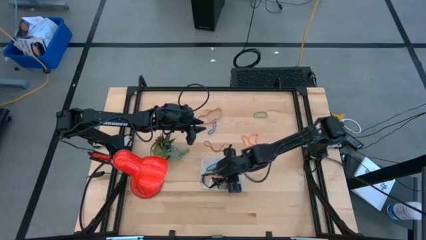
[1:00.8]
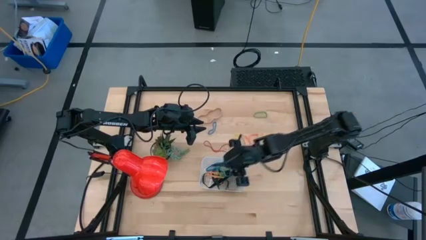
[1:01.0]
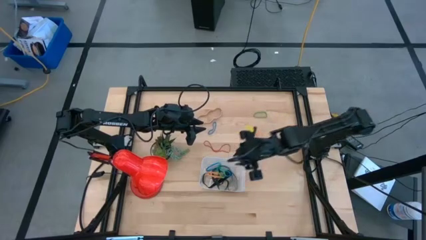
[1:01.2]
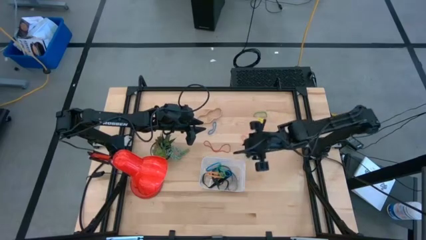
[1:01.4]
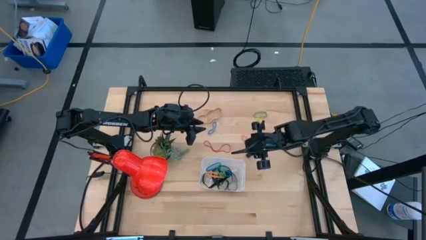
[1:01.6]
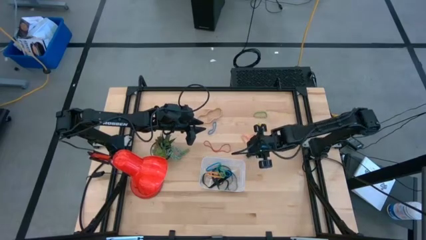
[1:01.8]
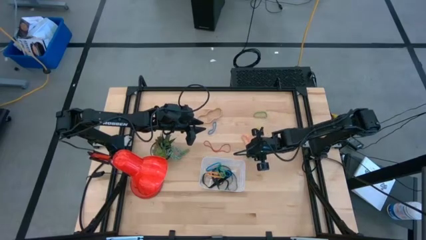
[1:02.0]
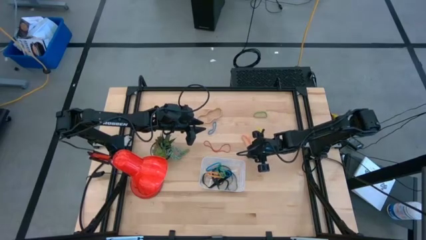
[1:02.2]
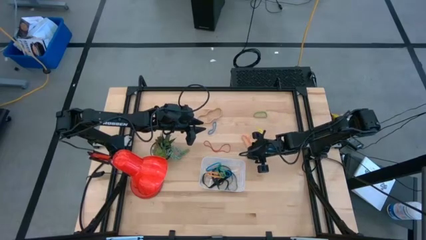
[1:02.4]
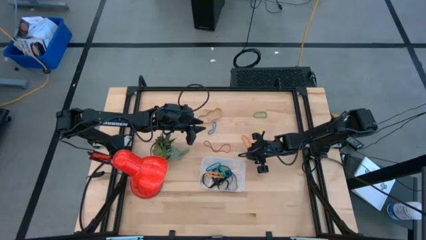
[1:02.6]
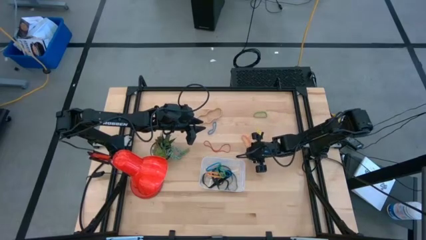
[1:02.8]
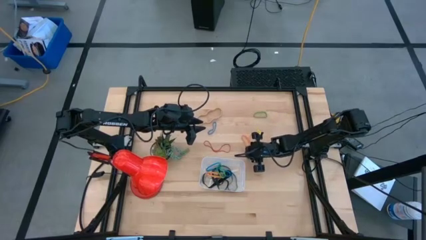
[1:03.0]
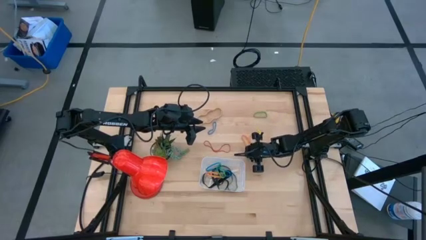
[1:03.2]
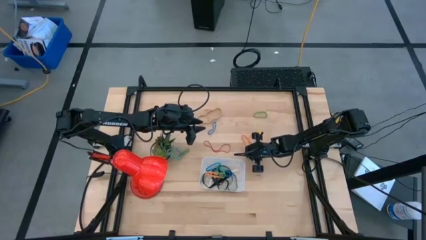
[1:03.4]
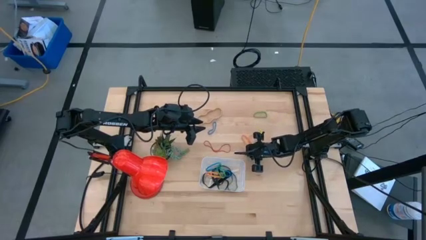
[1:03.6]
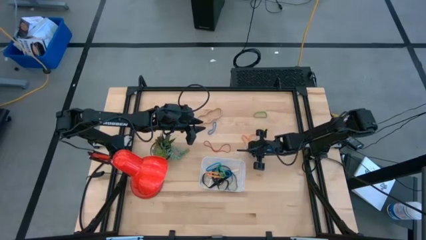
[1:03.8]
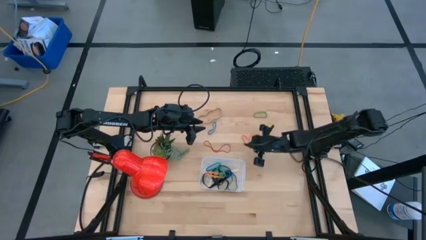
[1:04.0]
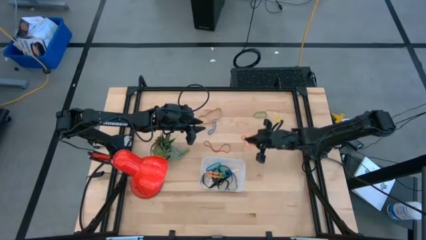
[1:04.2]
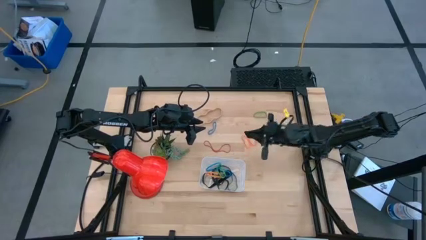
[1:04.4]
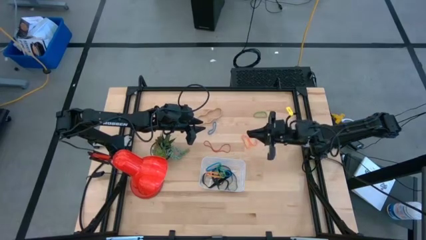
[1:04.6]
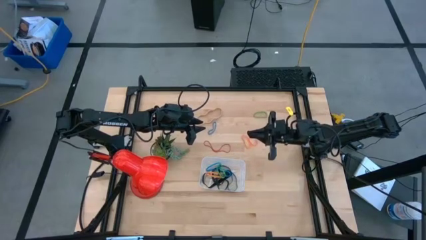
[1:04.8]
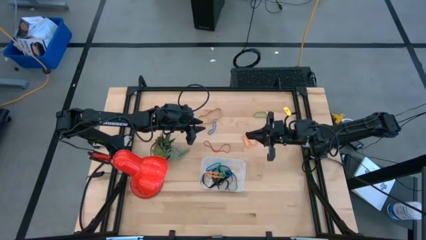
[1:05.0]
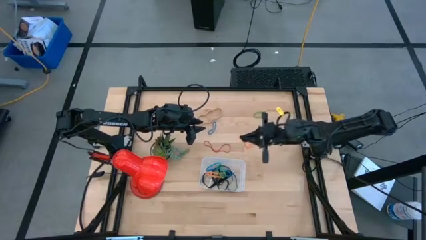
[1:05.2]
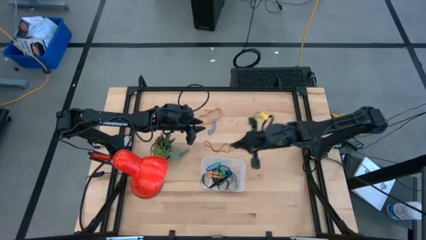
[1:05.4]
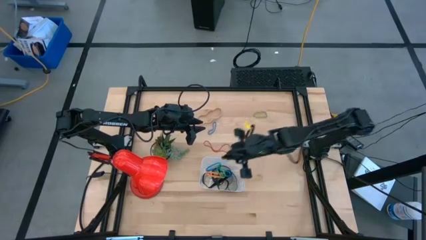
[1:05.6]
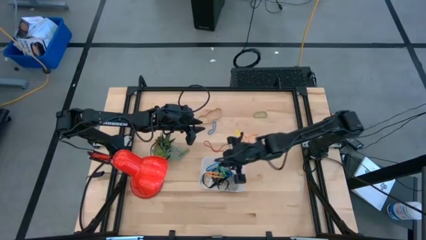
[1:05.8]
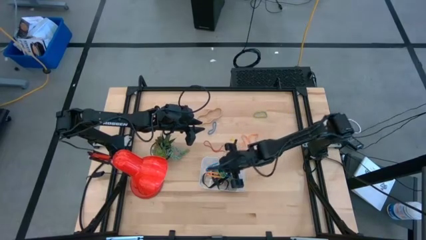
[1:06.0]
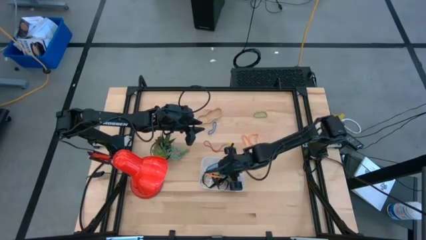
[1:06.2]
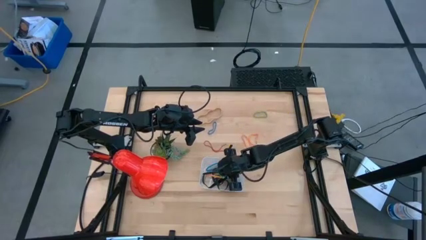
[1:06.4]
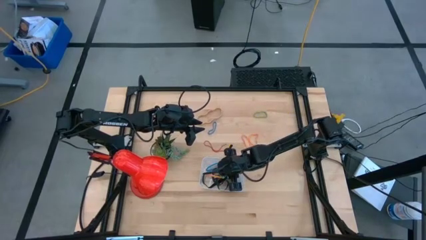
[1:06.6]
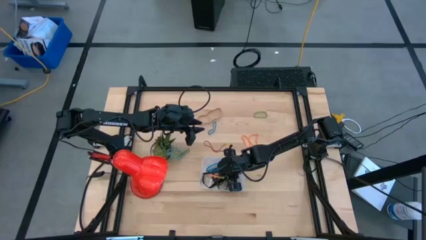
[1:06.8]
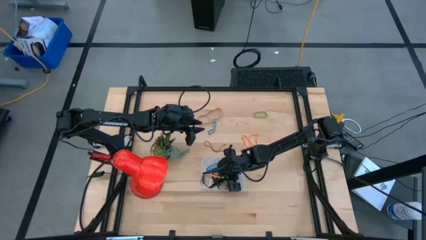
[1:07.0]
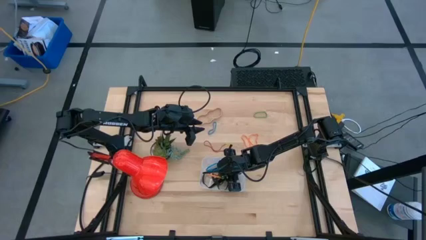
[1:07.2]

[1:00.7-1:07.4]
Task: Pick and place rubber bands into bin
Put the small black rubber band into the bin

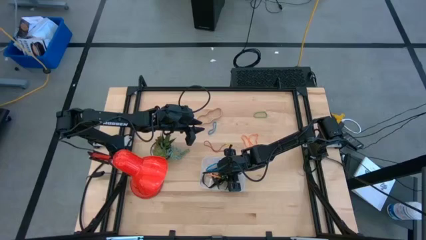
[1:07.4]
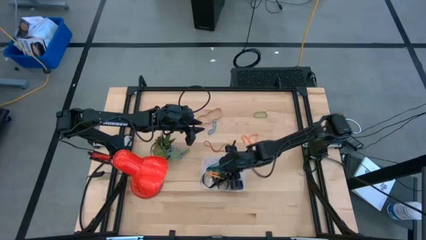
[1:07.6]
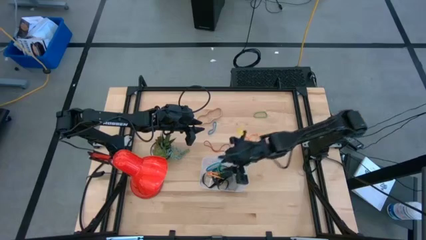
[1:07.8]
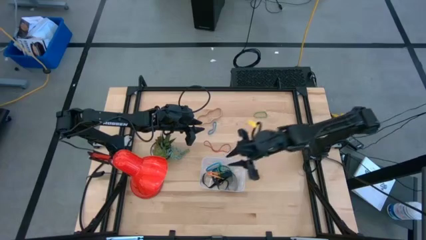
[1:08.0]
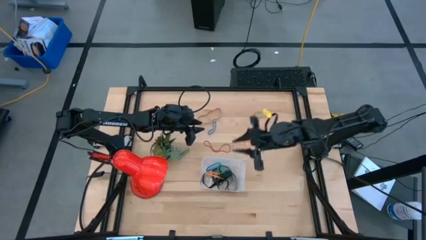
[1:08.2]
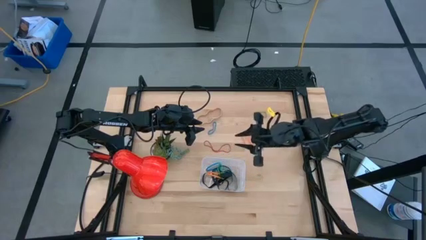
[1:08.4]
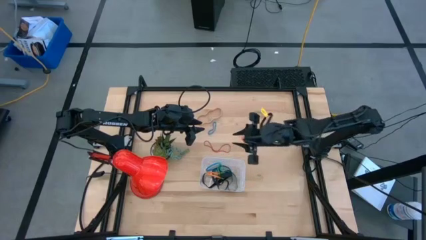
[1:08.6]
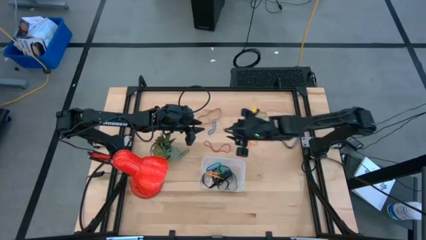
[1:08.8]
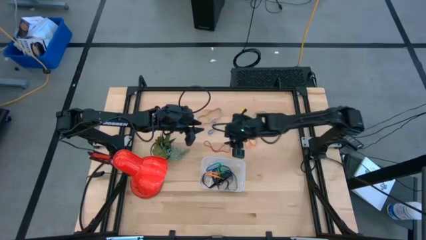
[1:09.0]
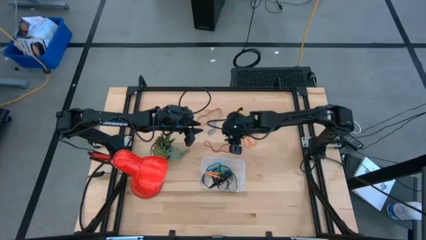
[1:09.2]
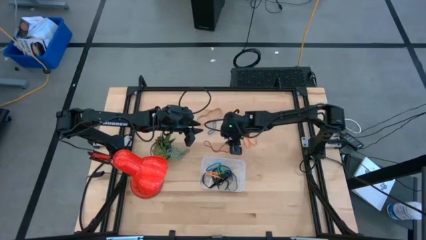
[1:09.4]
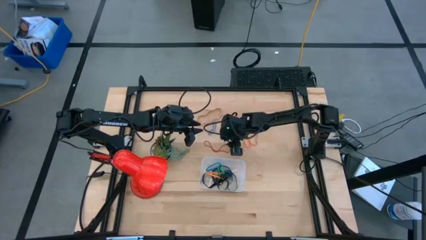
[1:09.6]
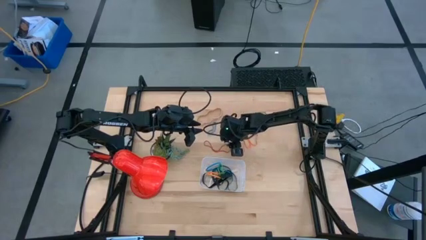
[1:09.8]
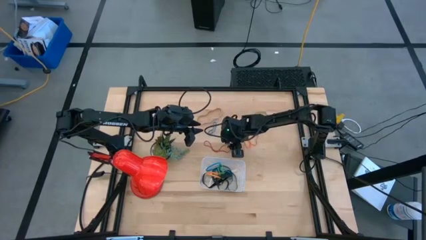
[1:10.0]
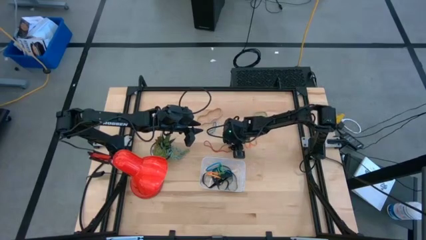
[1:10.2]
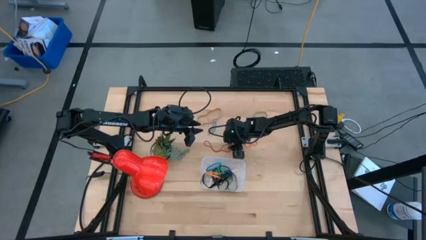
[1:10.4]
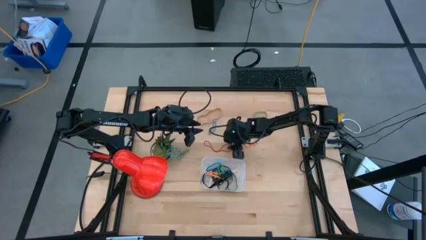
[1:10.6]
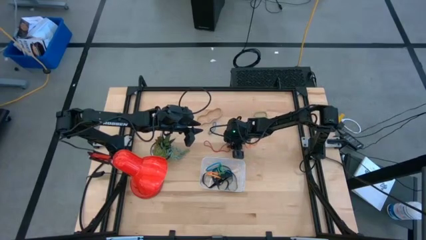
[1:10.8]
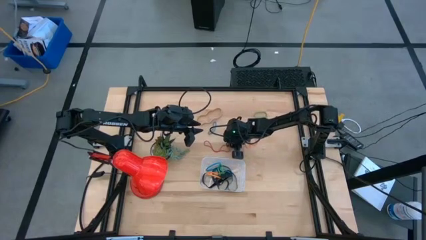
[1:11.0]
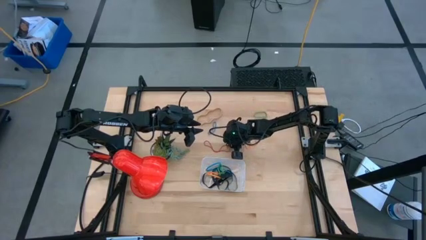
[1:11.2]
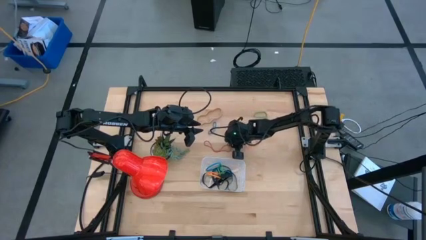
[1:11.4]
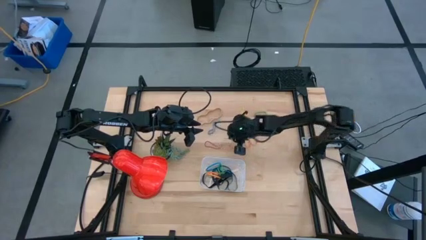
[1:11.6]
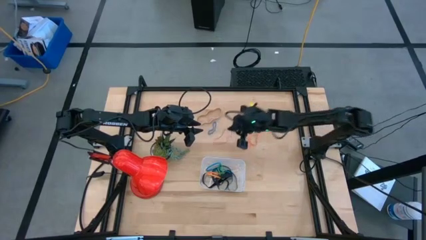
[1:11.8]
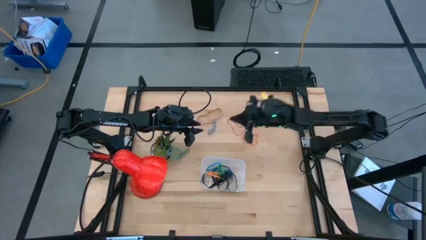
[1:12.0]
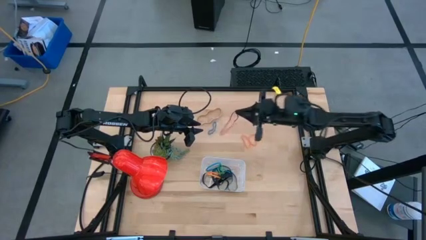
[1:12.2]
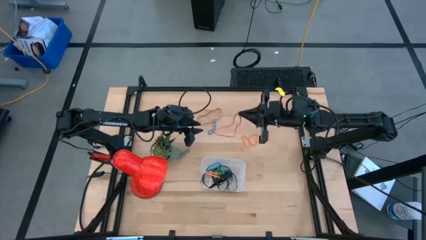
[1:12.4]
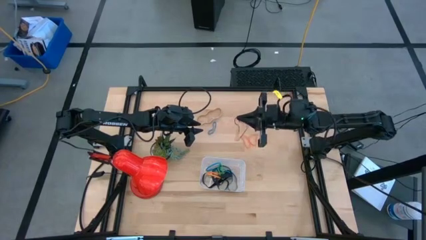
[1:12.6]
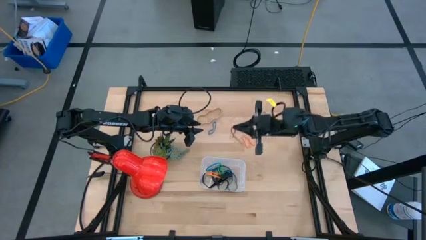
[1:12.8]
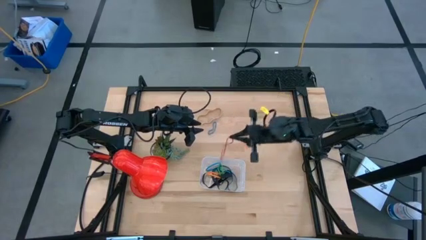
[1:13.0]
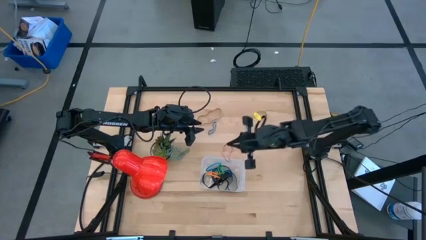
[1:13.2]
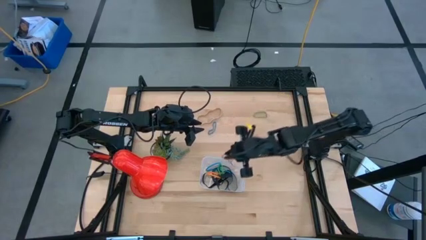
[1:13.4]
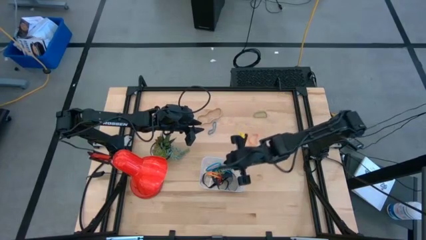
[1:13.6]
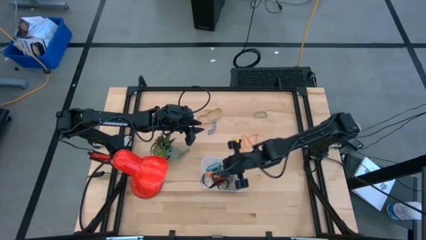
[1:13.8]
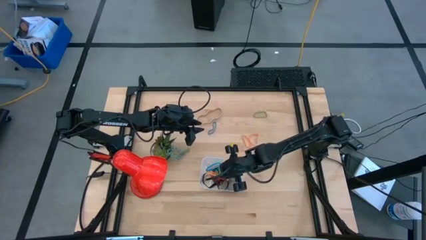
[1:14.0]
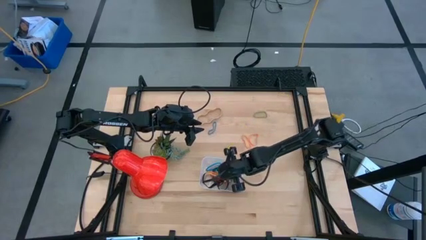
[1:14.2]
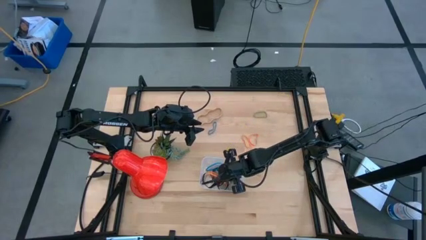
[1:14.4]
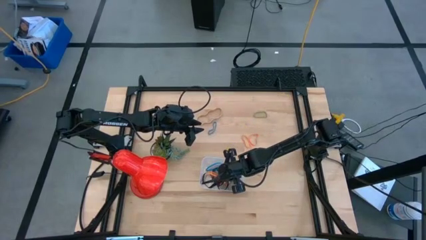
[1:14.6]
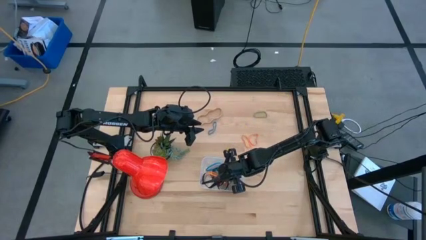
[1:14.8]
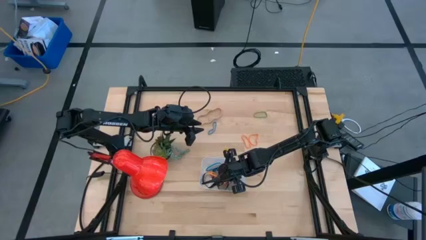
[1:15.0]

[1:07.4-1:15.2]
Put the red rubber band into the bin
